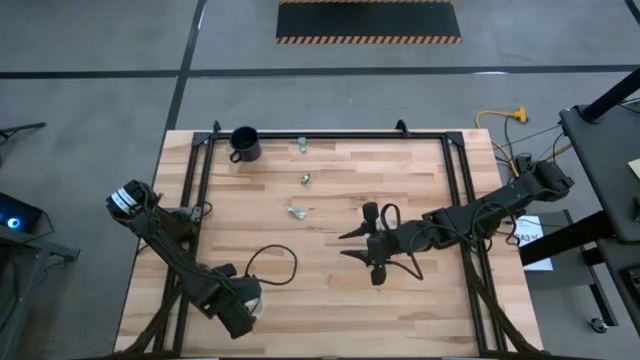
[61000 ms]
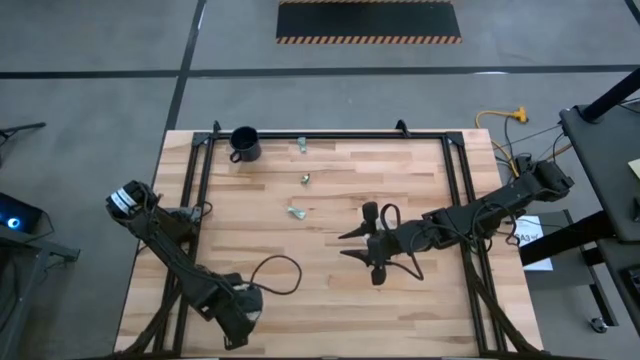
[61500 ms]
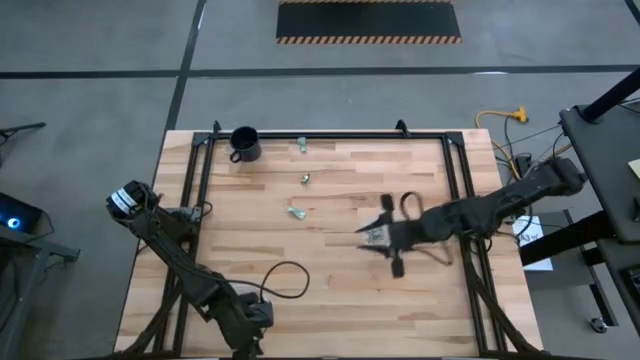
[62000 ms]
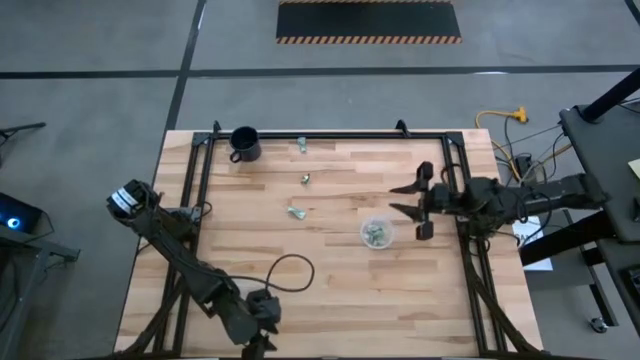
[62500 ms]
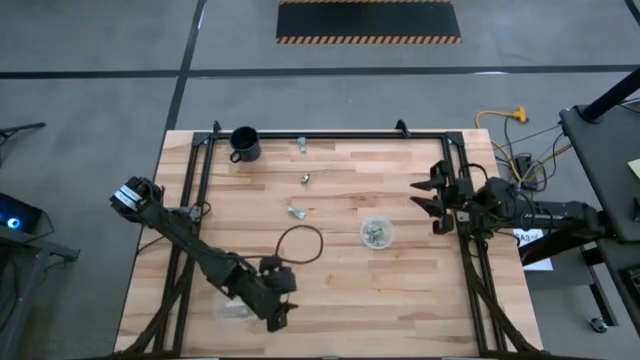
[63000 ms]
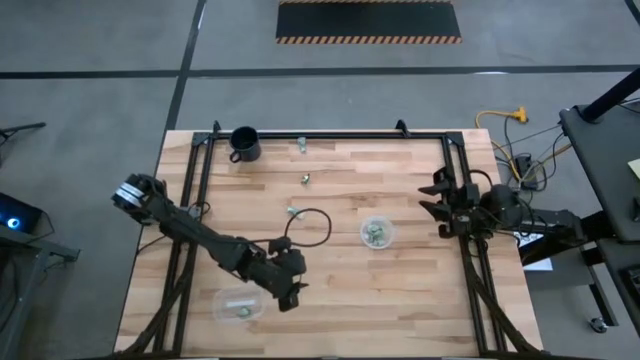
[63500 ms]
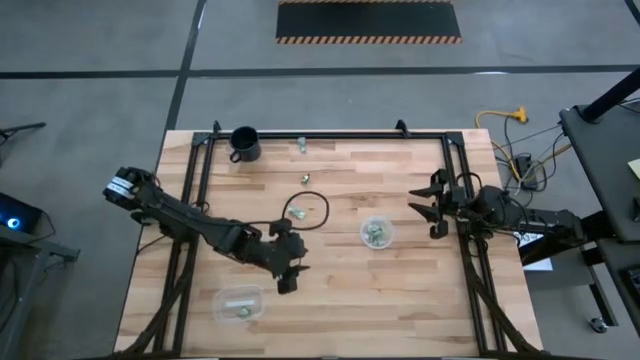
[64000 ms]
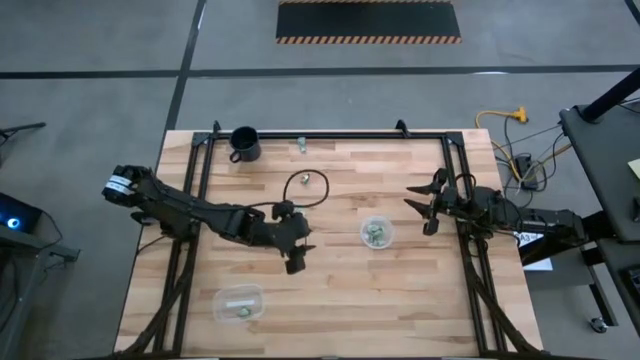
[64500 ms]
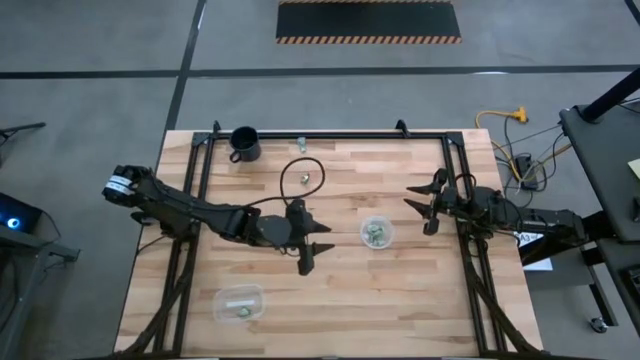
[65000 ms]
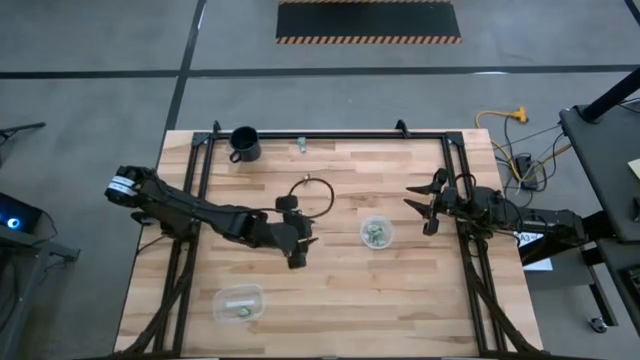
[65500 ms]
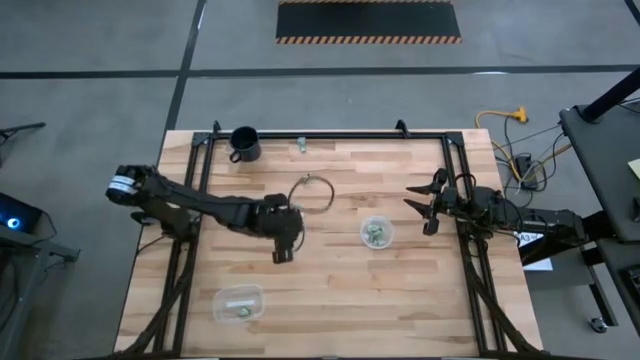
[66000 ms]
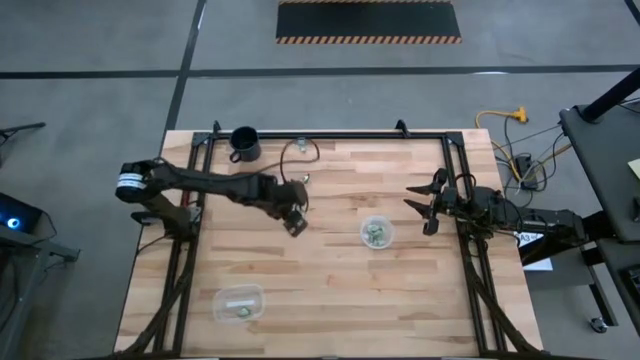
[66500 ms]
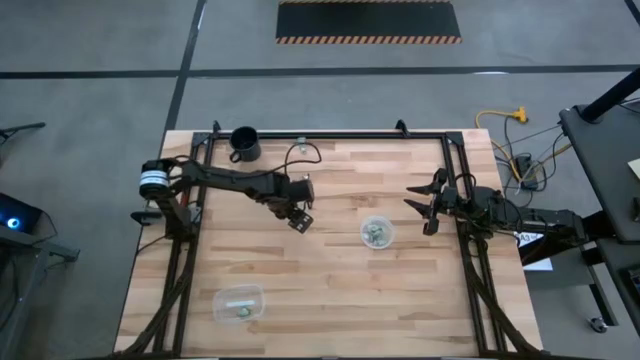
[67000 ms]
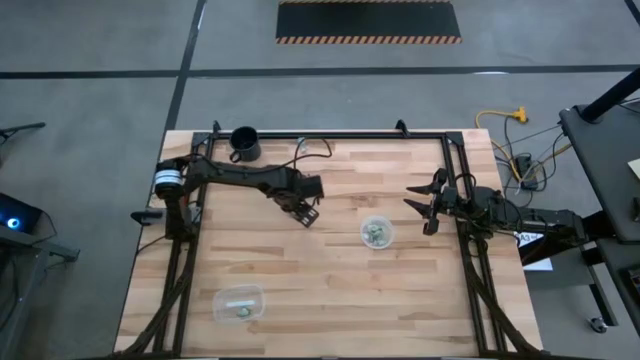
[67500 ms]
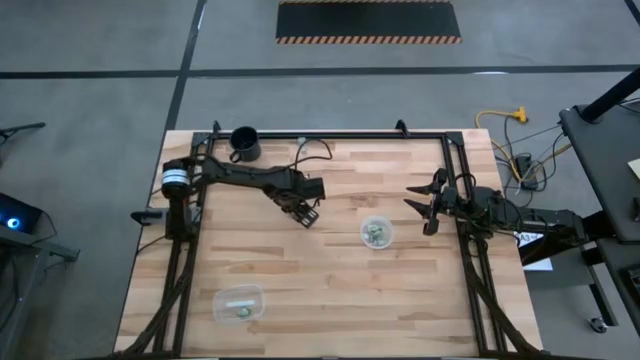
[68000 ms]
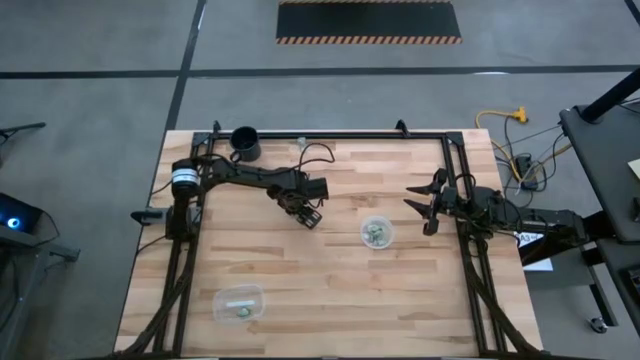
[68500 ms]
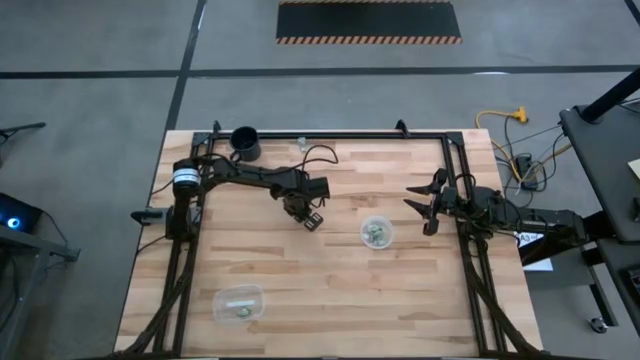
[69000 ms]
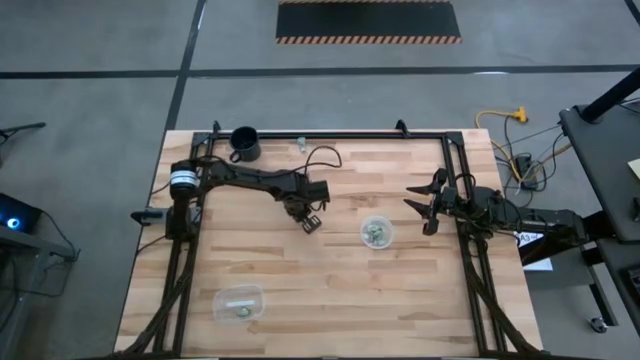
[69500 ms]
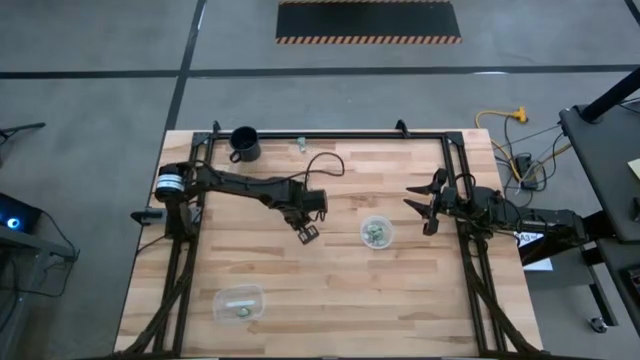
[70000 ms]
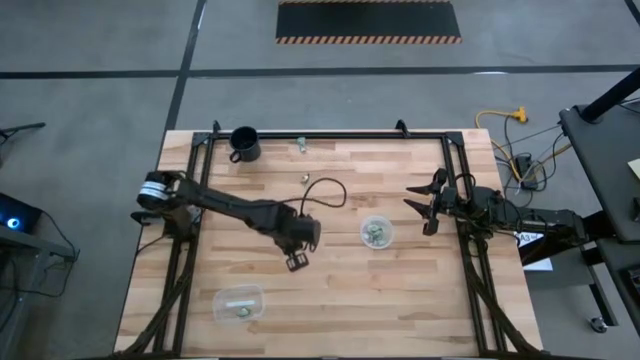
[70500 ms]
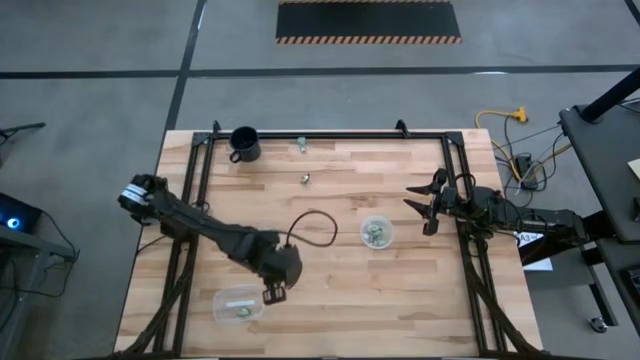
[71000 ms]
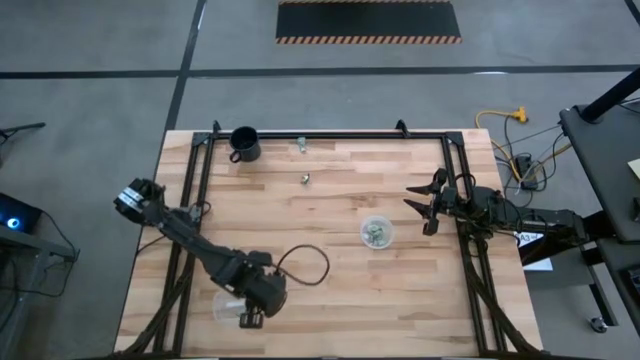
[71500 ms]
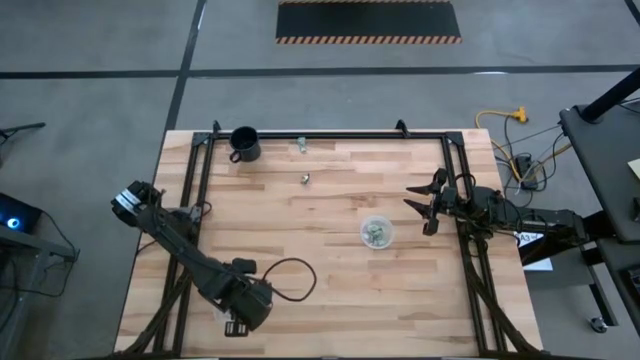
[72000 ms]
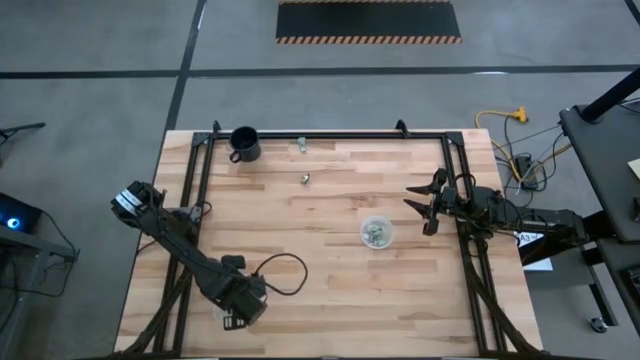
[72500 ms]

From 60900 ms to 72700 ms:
Task: Pick and place Stevia / Truvia into bins
Put the white stevia packet into the left transparent container

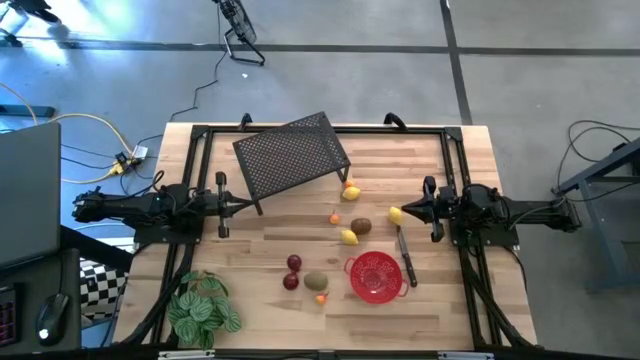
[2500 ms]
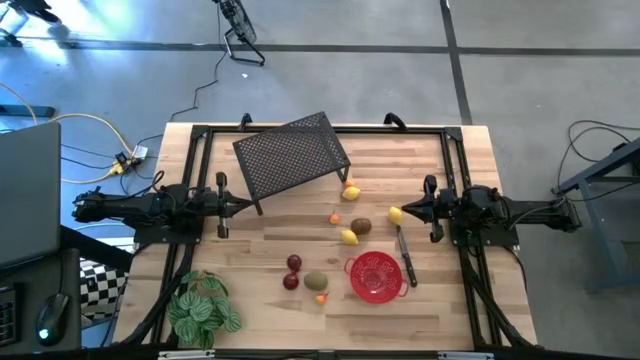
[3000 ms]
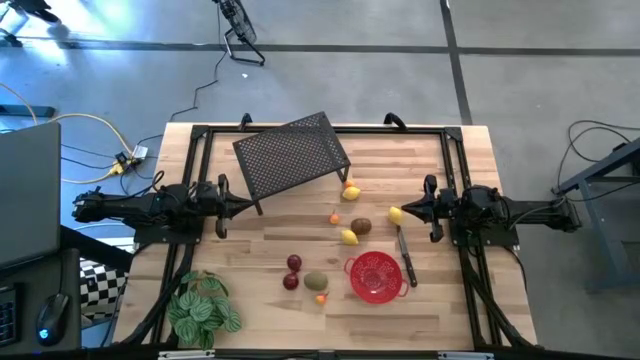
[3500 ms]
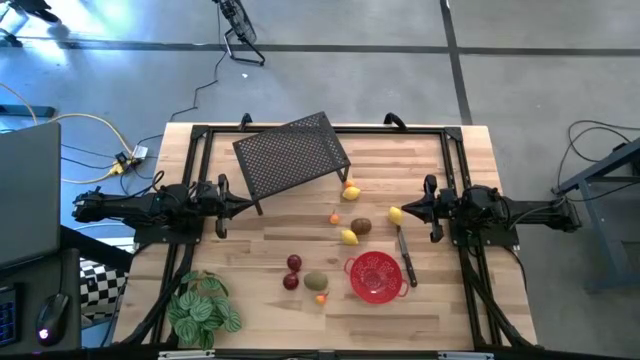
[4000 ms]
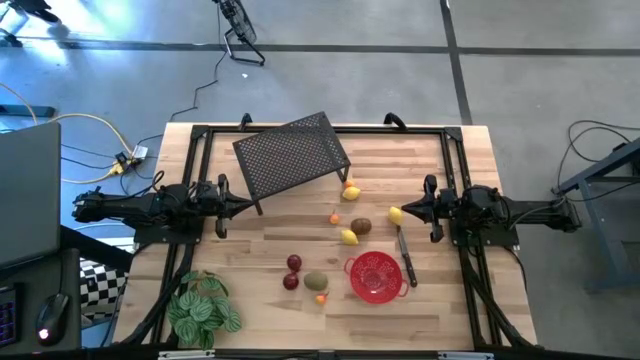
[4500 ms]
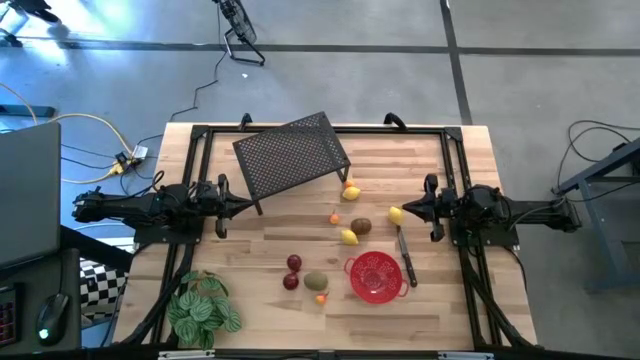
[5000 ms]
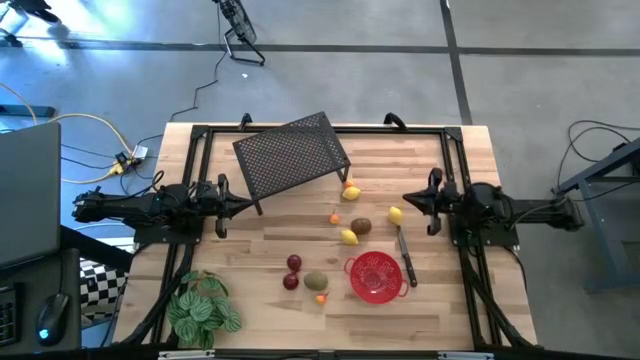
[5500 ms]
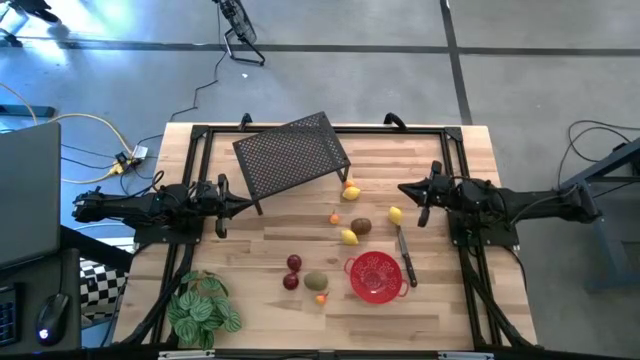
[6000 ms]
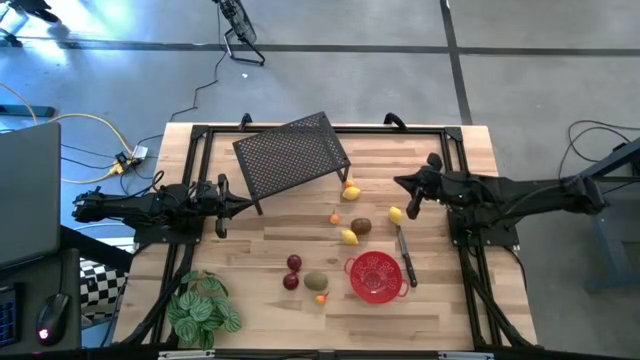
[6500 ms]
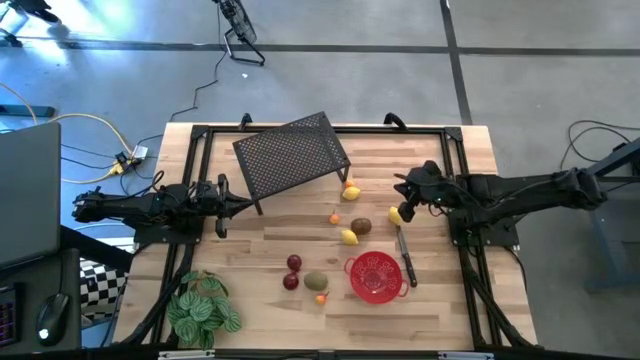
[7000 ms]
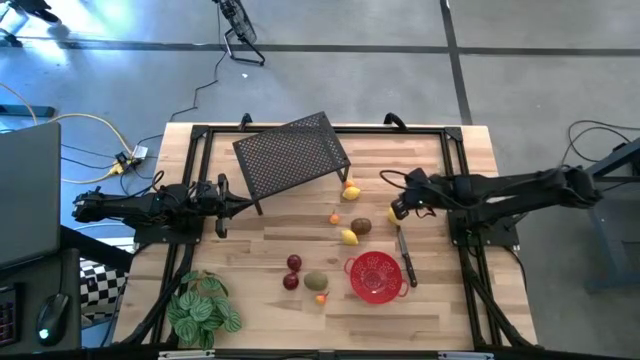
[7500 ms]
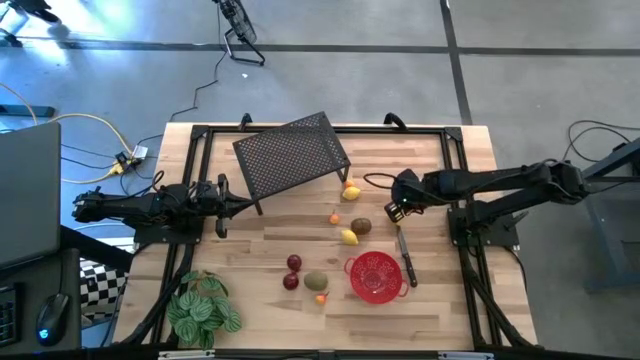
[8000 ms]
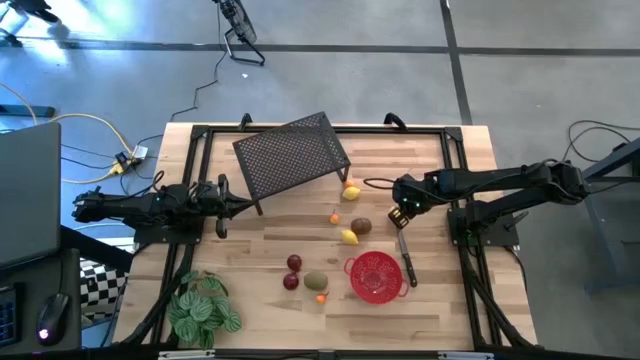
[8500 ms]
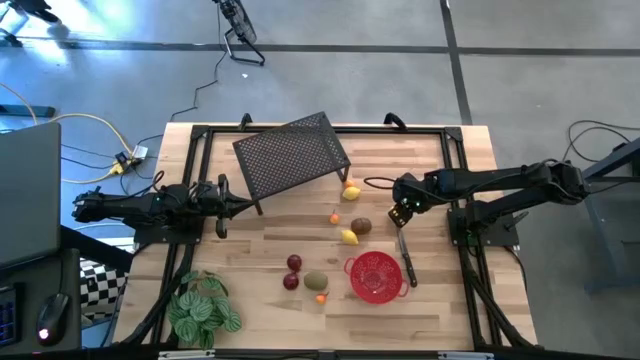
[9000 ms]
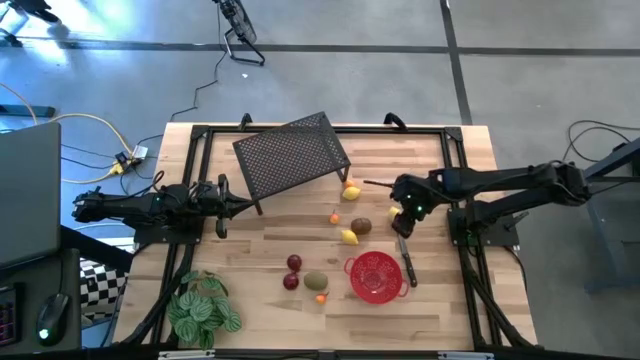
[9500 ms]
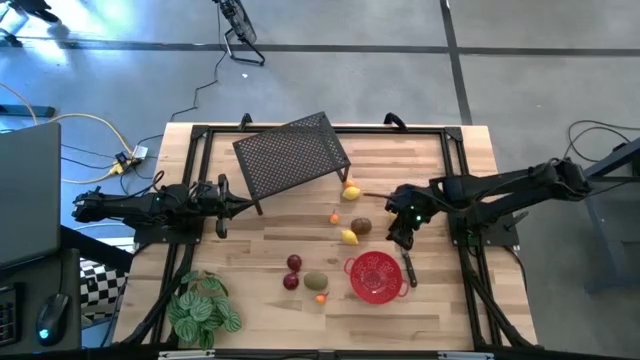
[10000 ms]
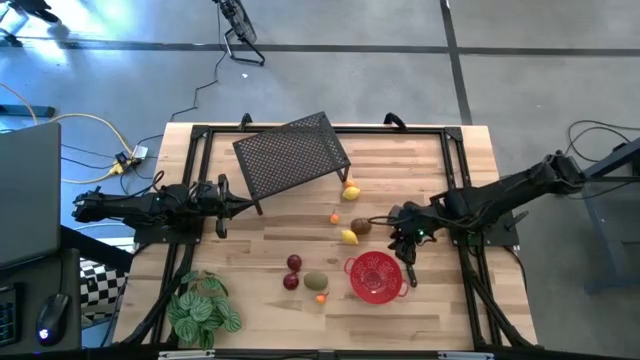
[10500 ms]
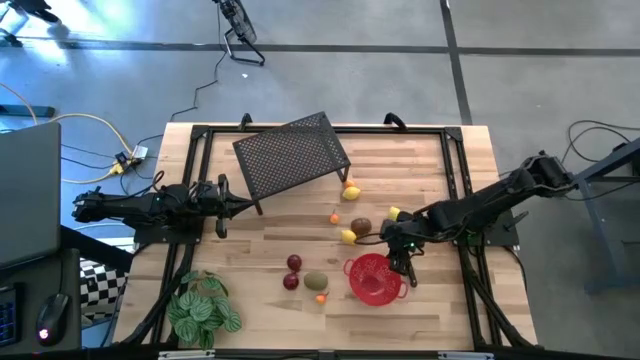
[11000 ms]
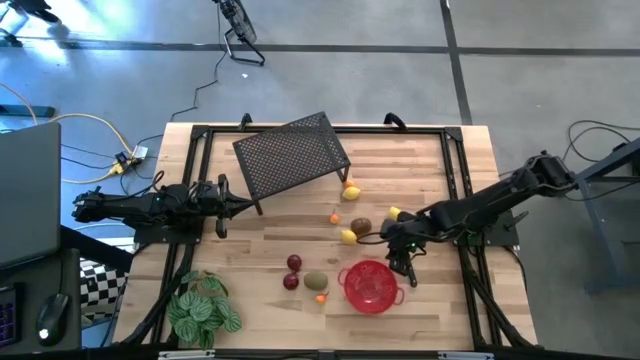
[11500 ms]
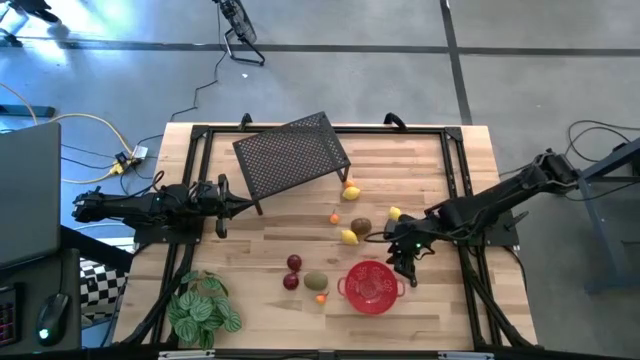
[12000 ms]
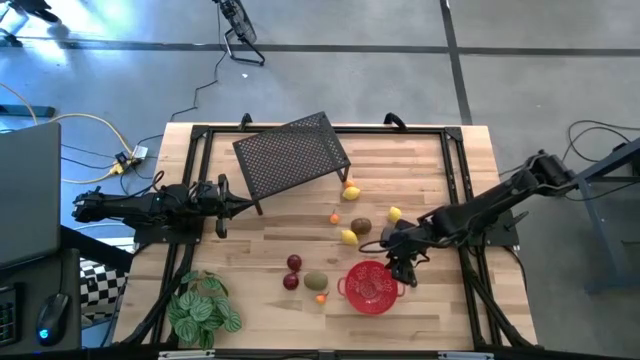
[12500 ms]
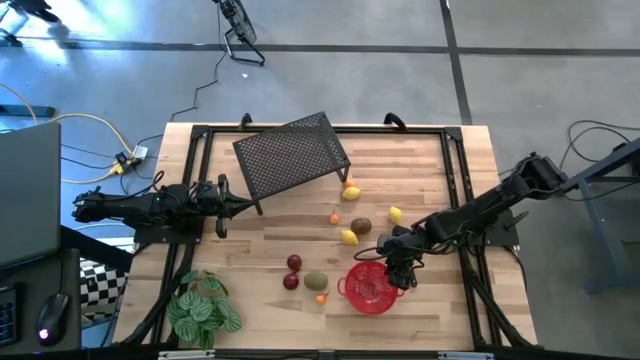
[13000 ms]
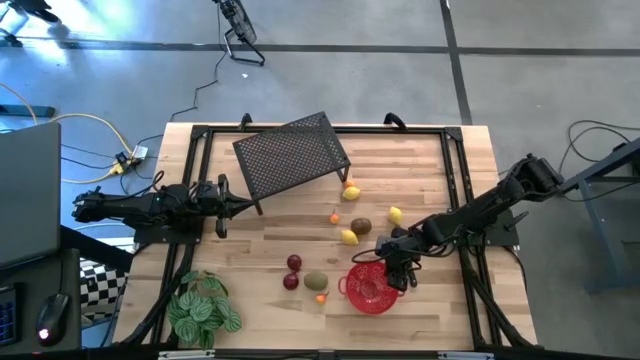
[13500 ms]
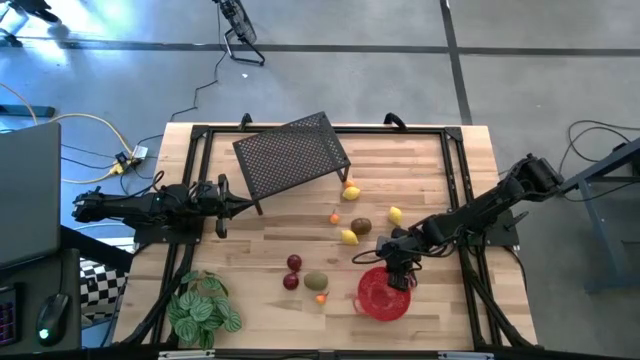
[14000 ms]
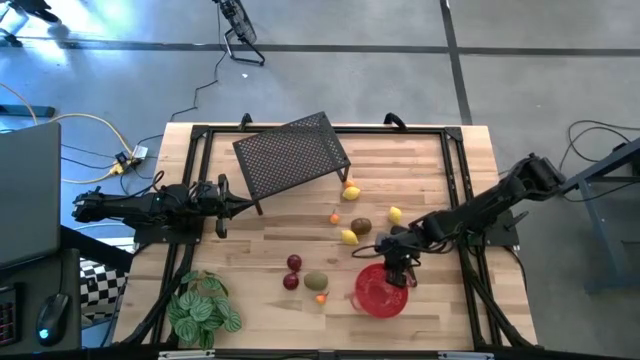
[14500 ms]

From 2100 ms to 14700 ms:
Task: Pick & Place Fruit
Put the red strainer bowl on the shelf
